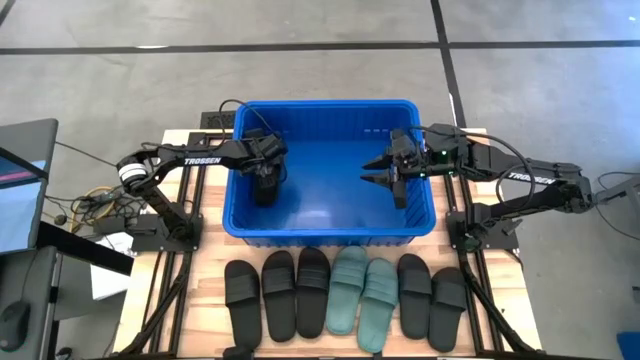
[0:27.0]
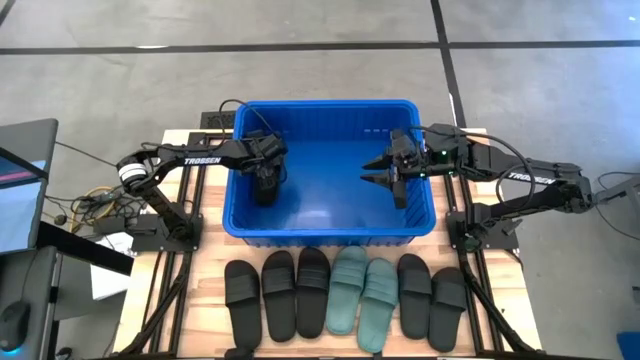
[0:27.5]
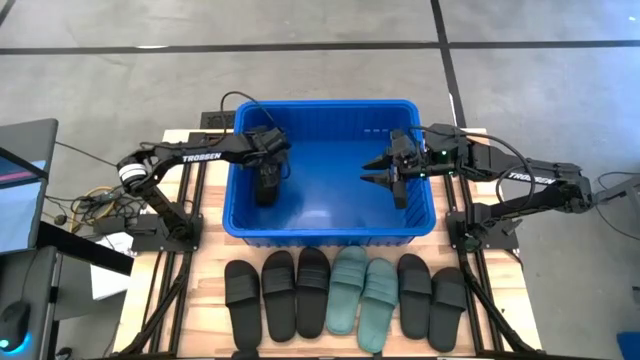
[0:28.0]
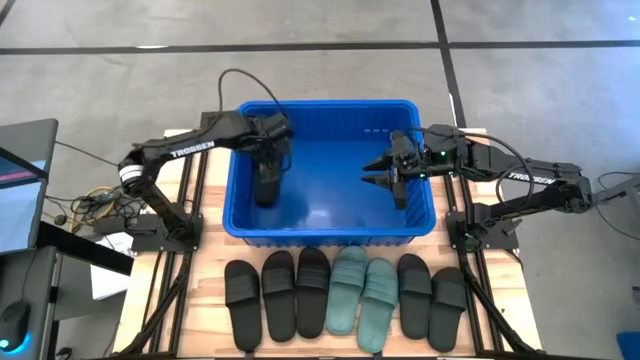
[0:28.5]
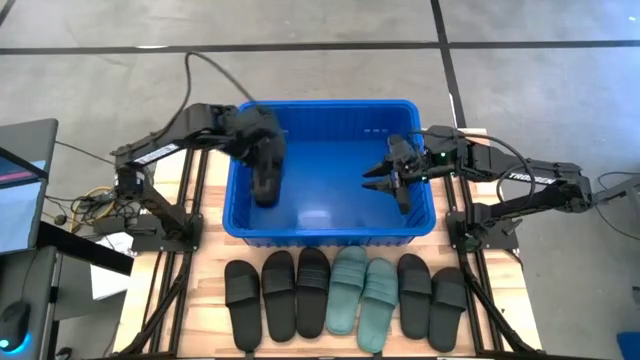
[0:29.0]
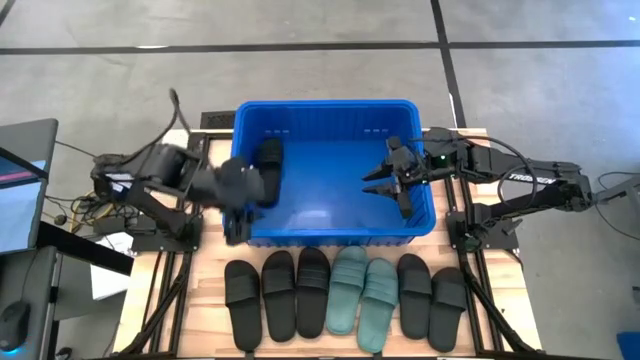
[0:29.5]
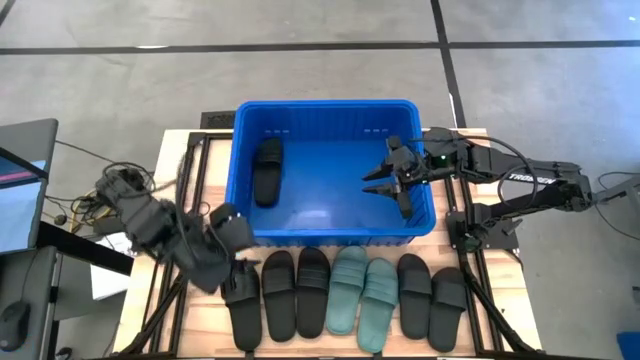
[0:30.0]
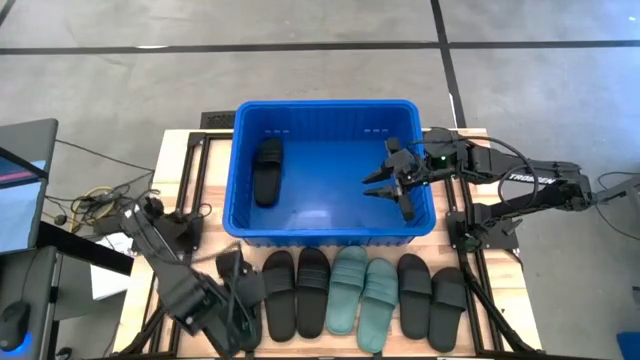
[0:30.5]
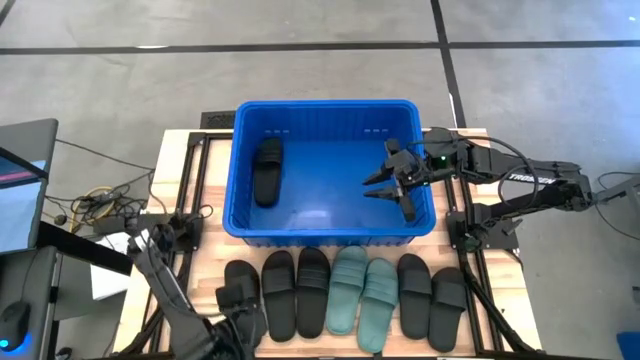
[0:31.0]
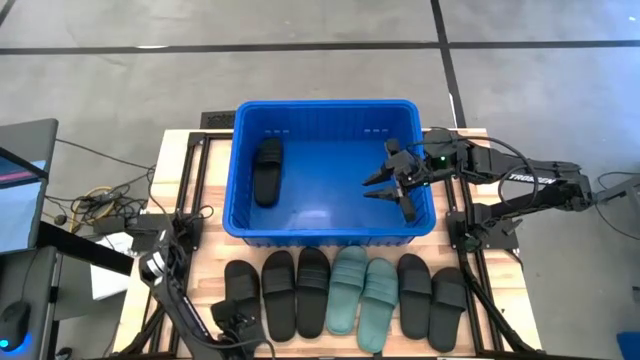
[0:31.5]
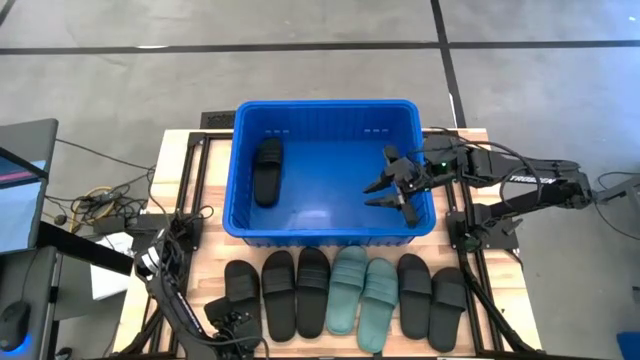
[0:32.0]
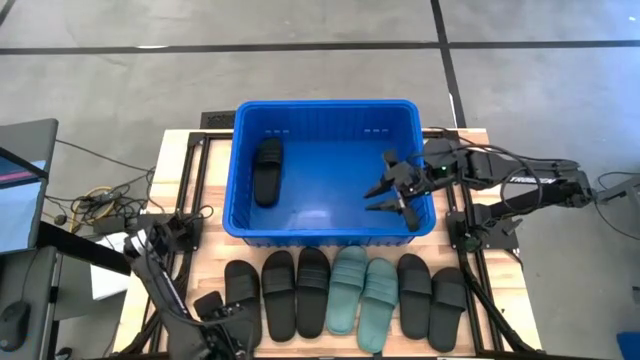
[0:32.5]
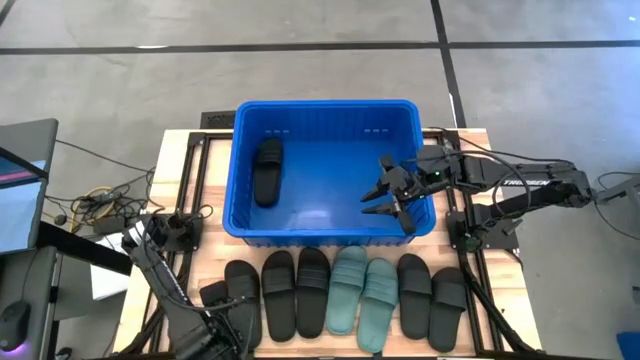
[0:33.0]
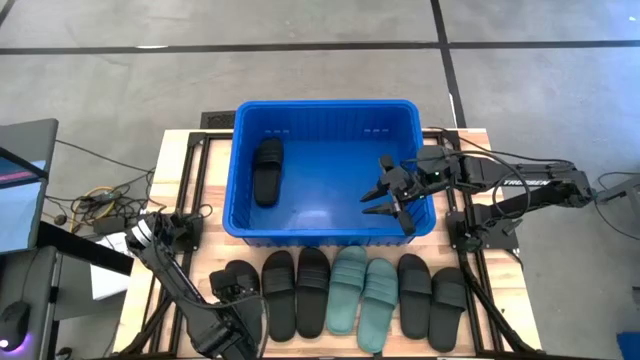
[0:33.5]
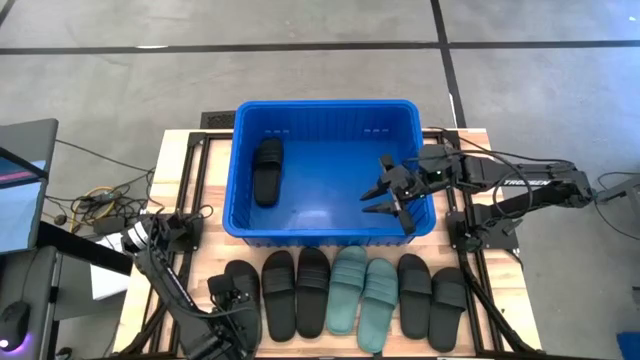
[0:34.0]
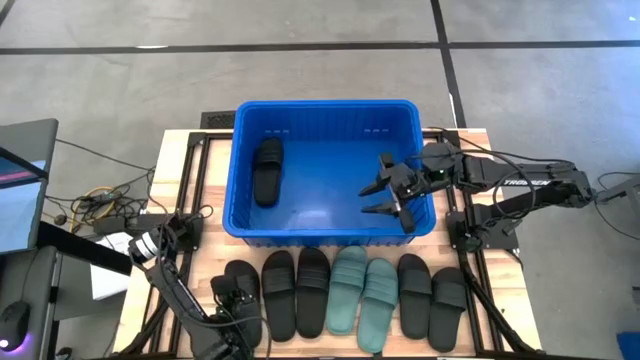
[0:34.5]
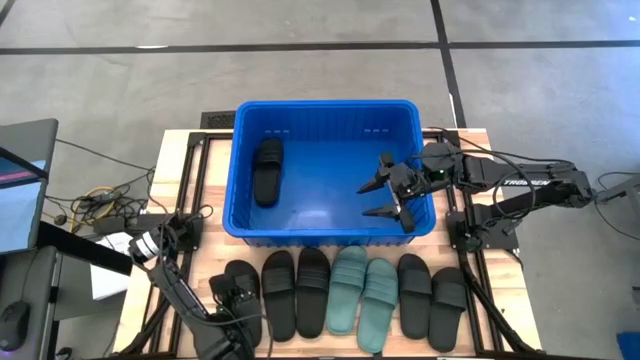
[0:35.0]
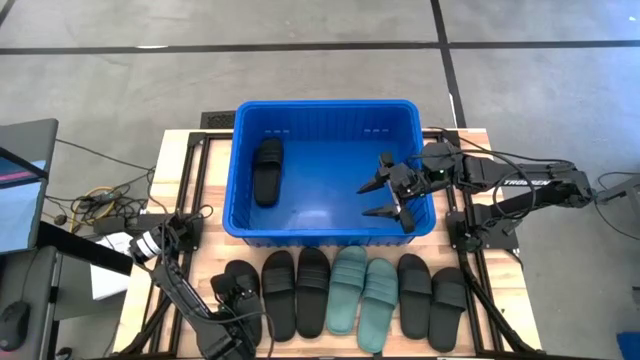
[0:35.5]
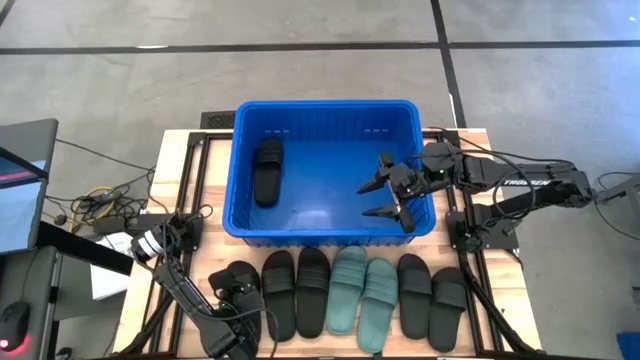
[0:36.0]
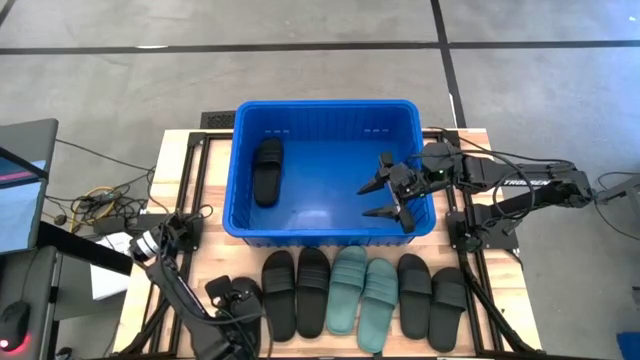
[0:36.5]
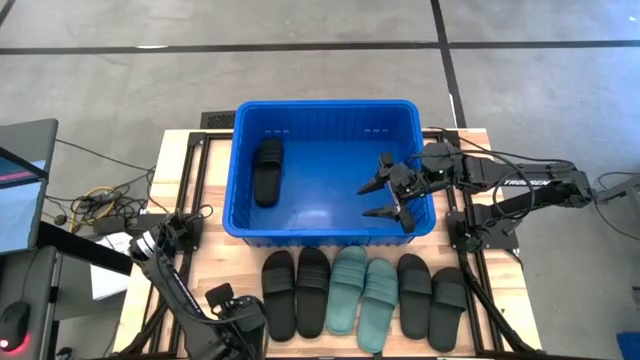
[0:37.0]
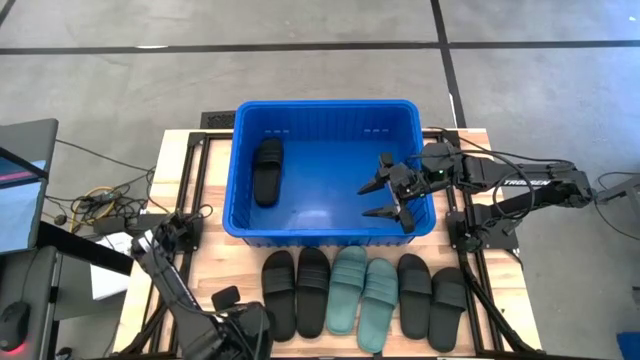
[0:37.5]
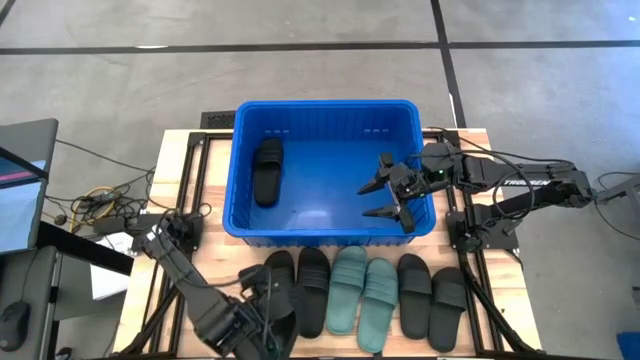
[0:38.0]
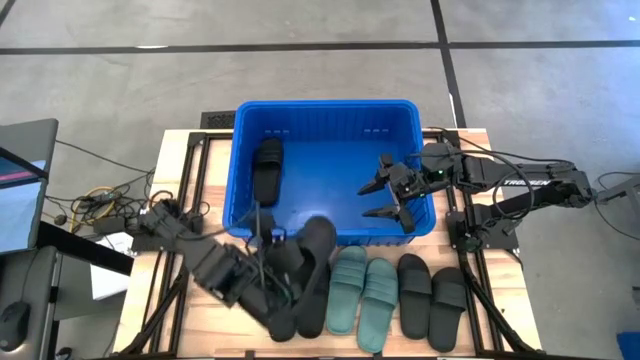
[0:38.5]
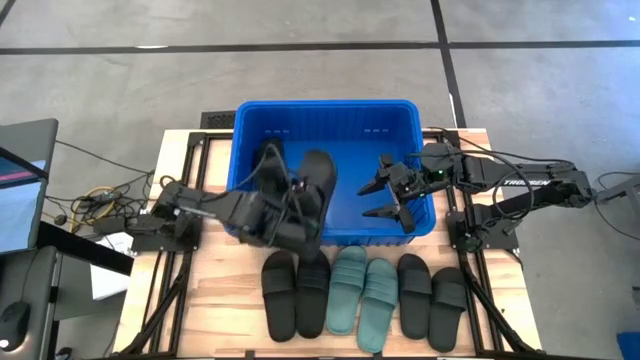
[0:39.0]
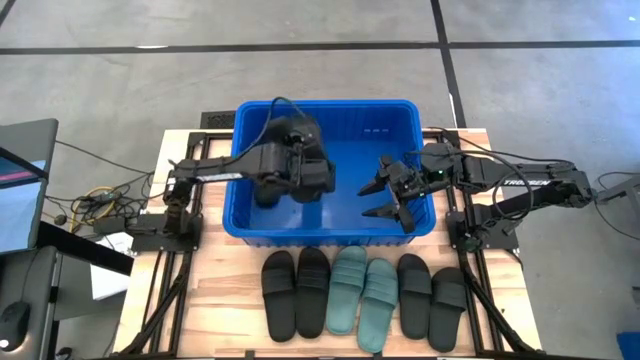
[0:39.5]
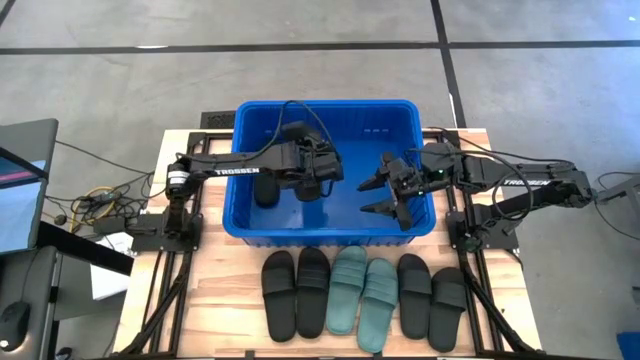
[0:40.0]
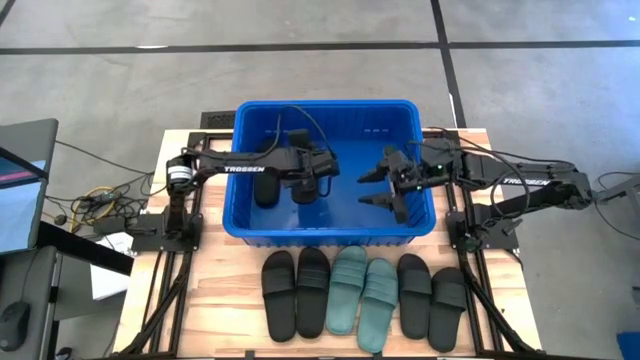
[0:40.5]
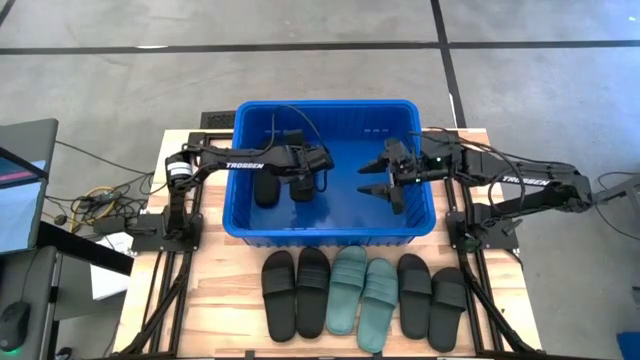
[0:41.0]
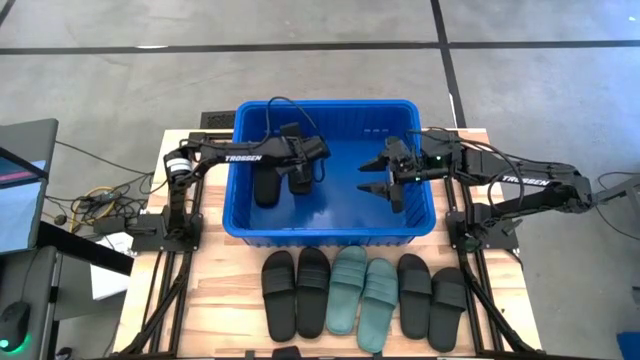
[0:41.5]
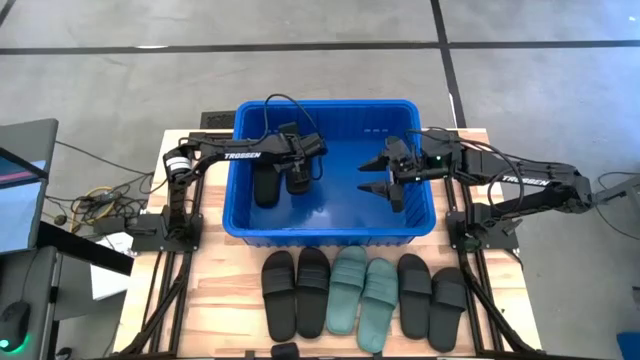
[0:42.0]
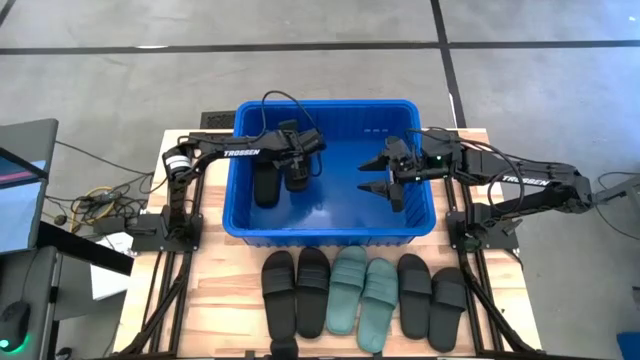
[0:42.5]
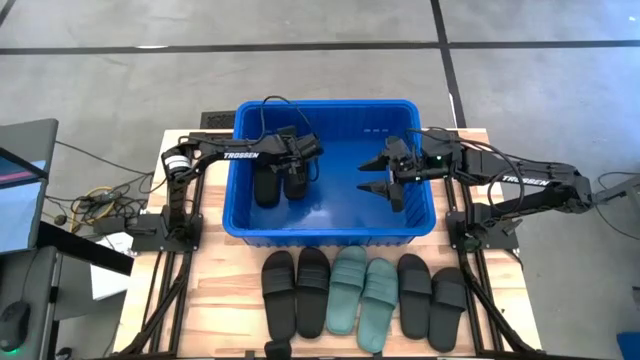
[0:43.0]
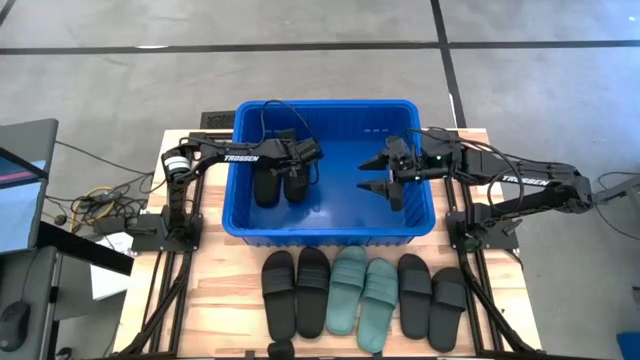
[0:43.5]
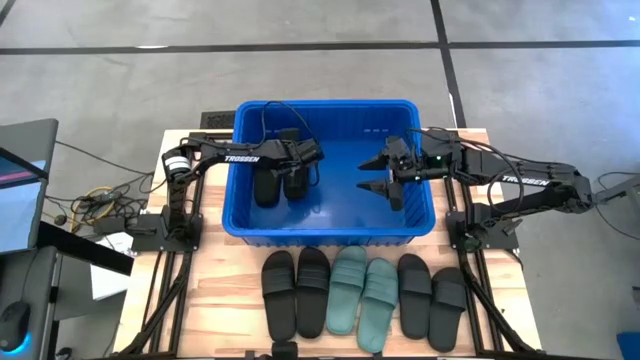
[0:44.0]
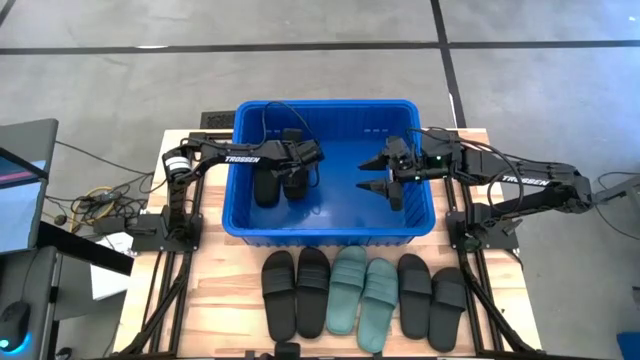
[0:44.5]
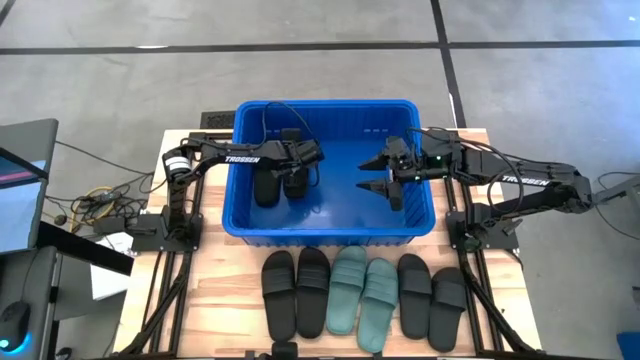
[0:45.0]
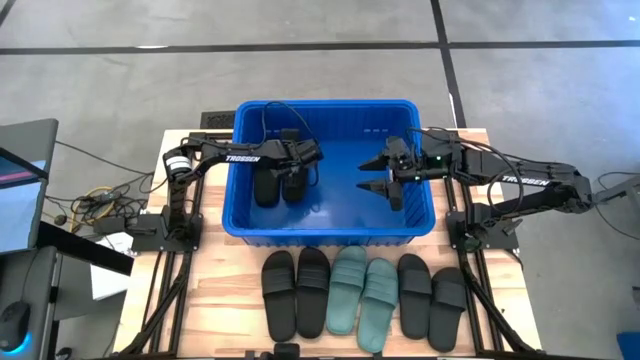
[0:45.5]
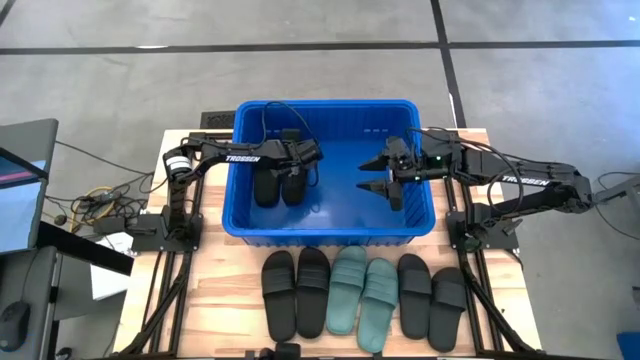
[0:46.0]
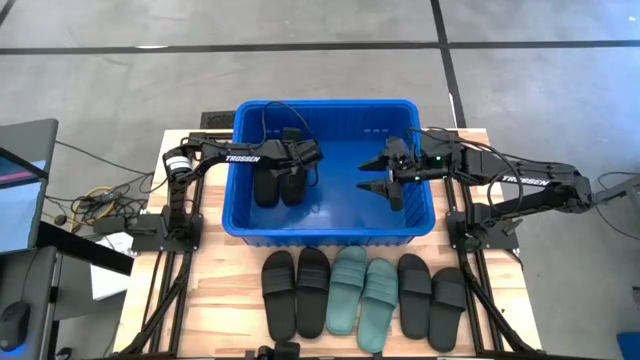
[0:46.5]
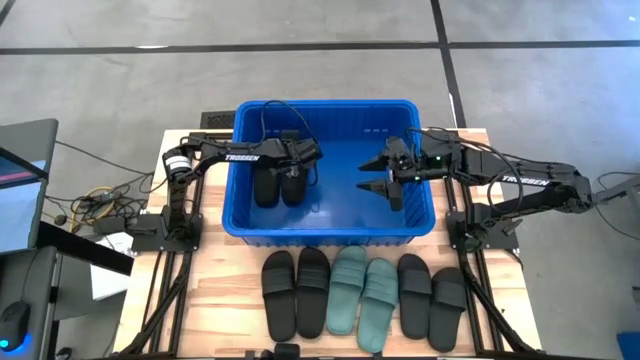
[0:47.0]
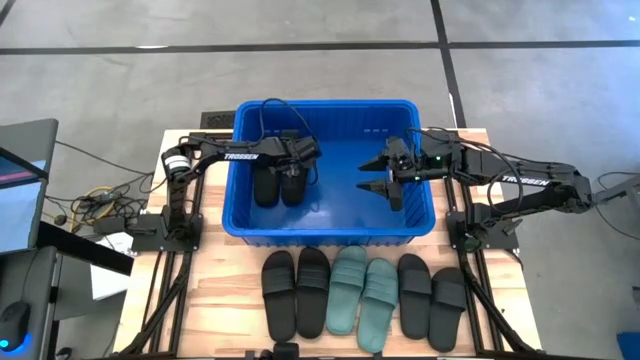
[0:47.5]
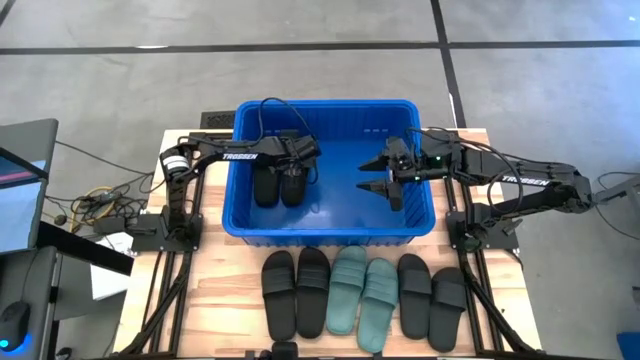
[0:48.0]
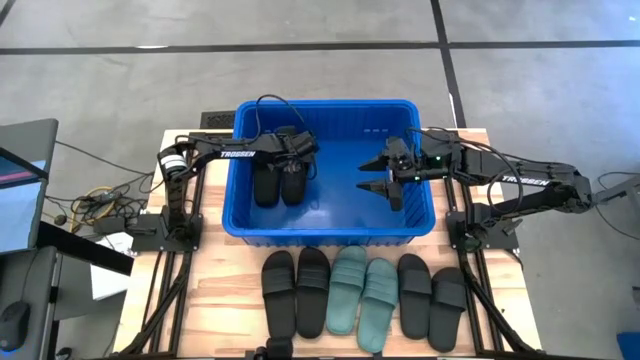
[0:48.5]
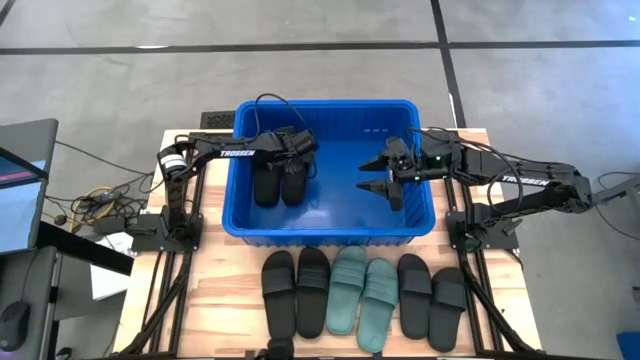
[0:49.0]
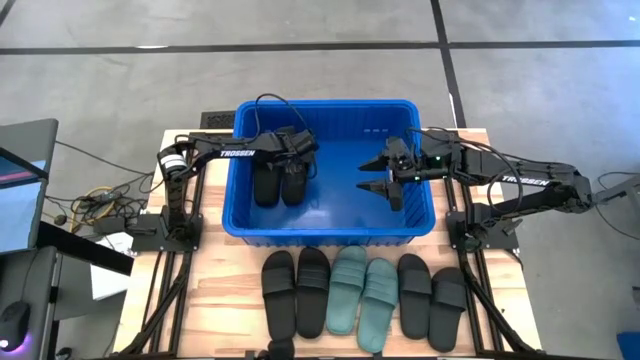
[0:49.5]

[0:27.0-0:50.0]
Task: Pick and place slides into bin
Put the black slide into the blue bin
